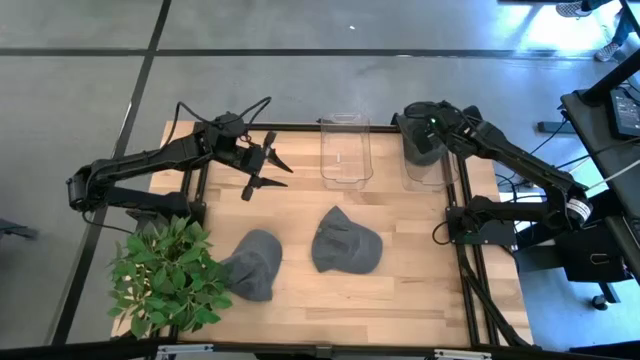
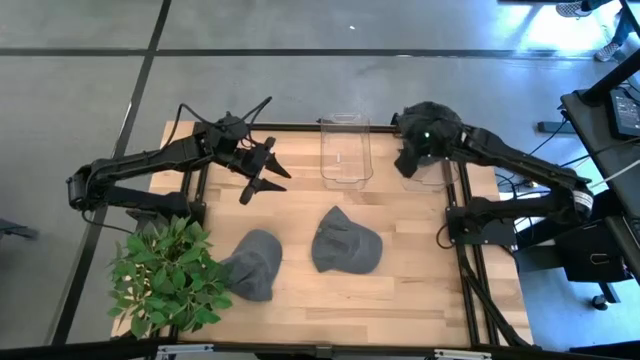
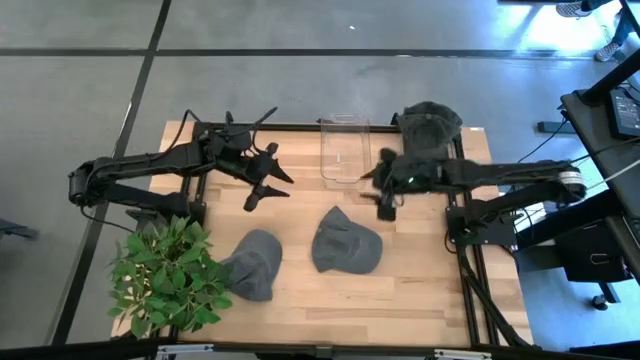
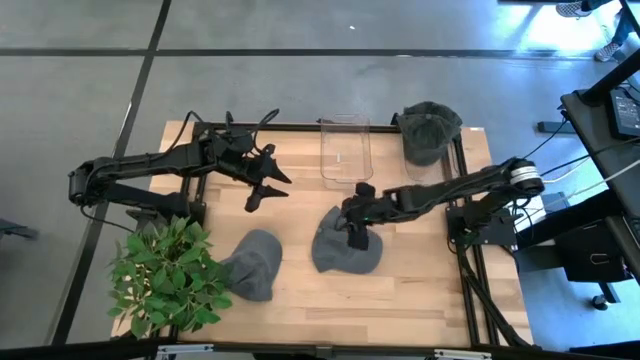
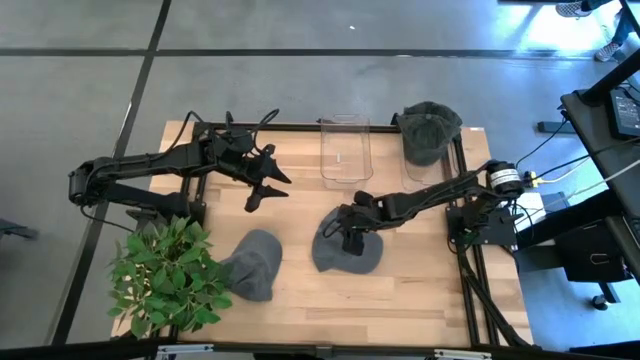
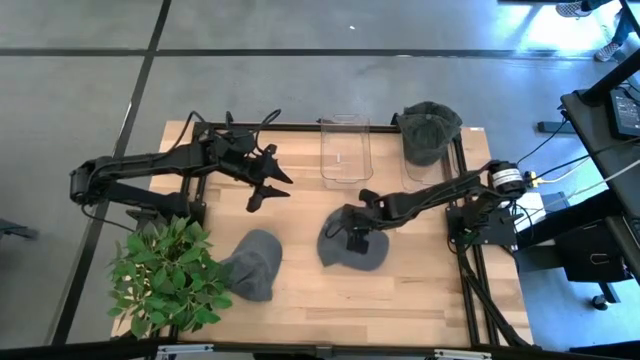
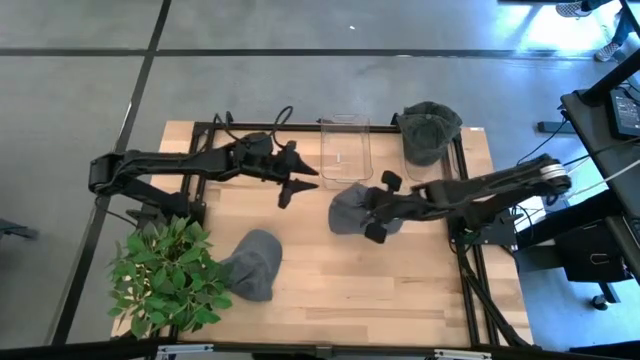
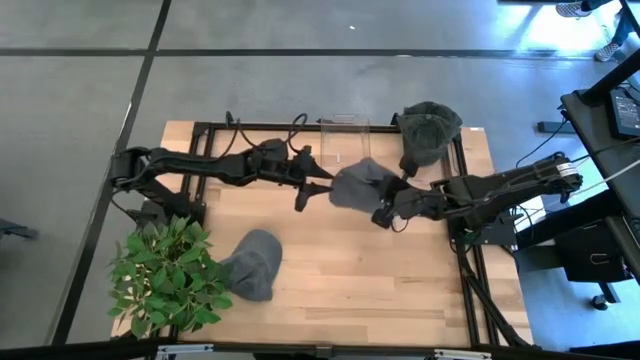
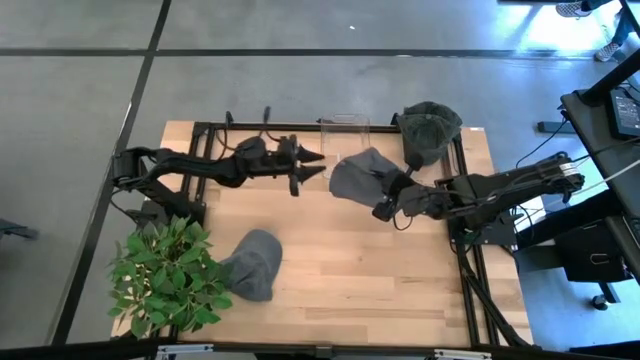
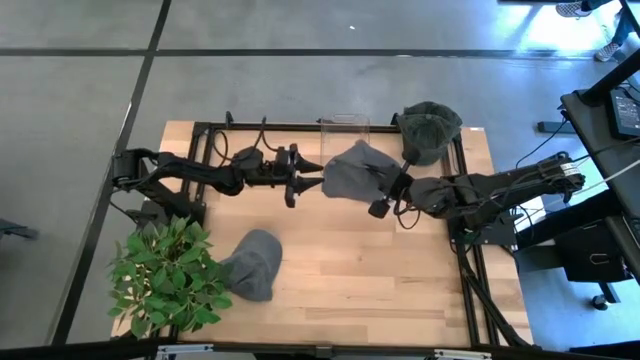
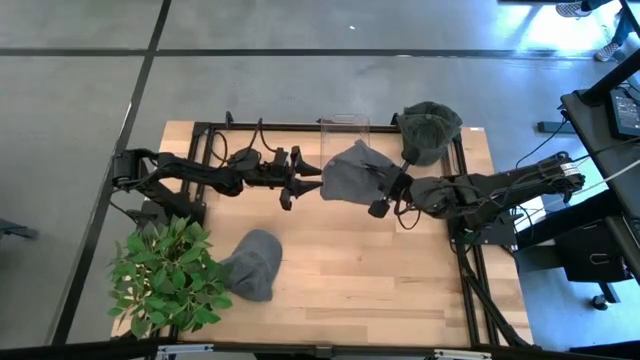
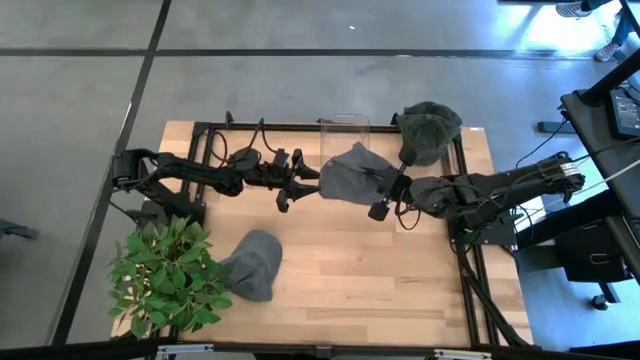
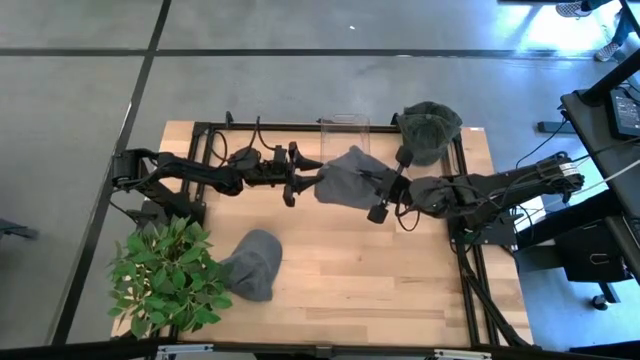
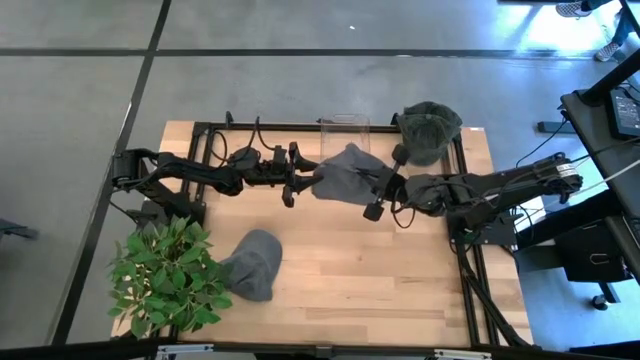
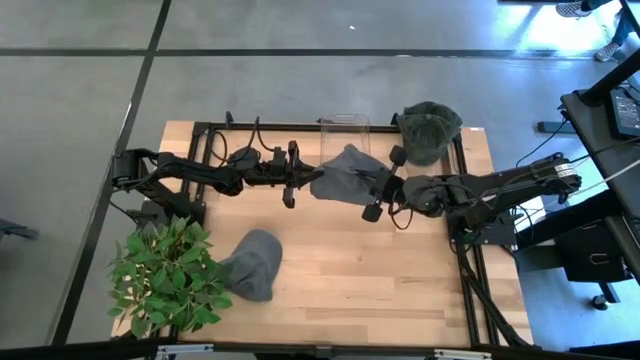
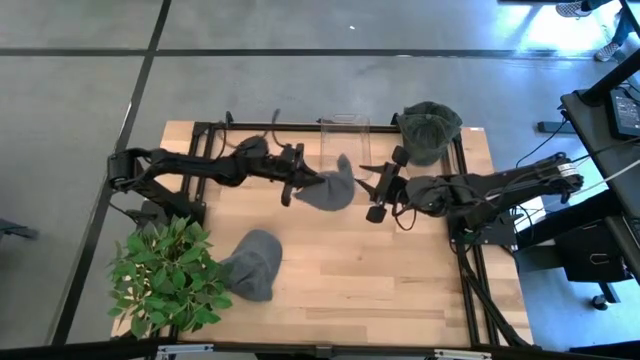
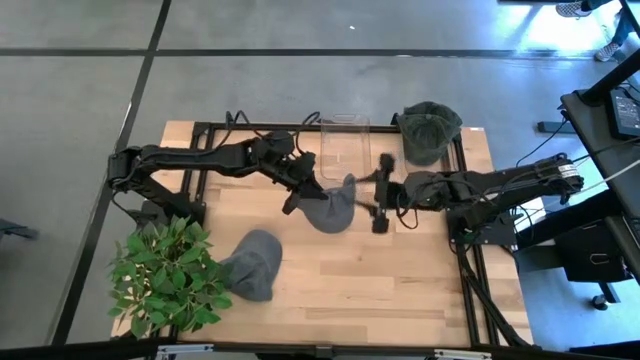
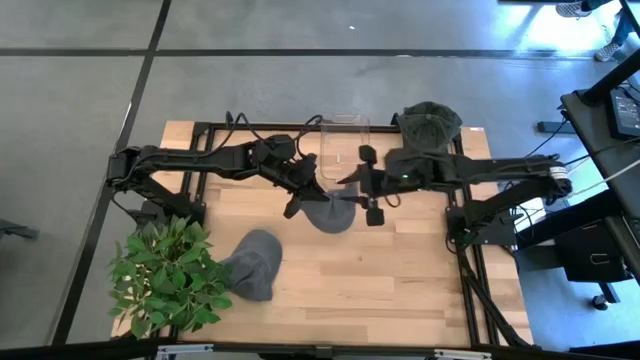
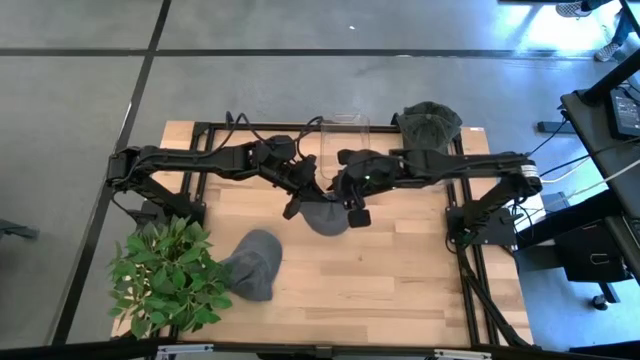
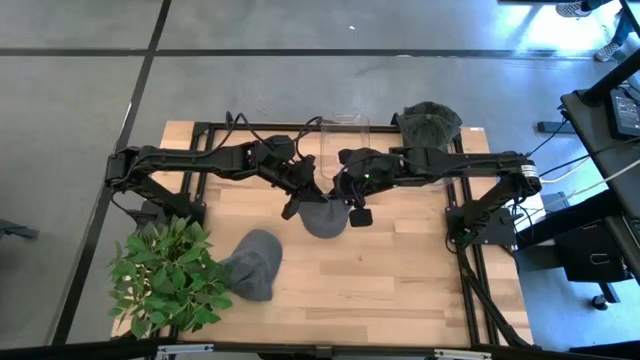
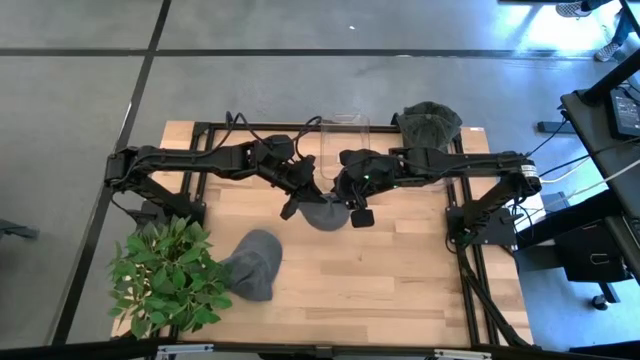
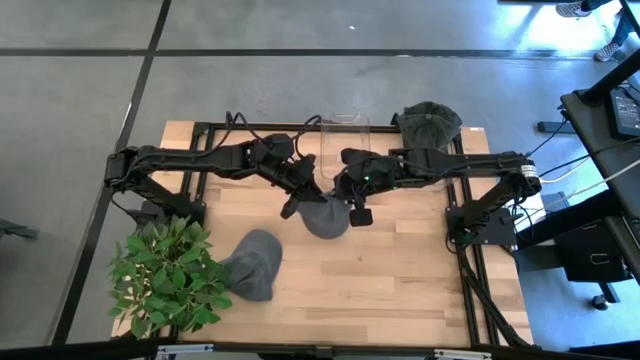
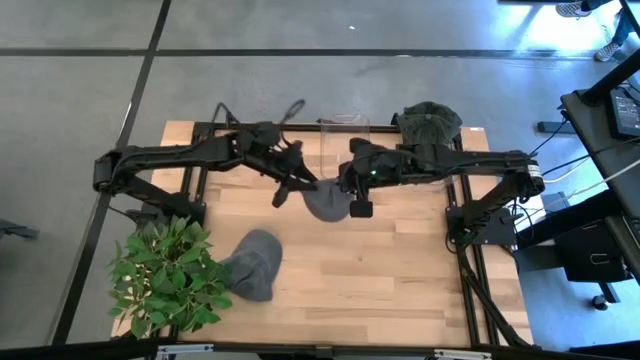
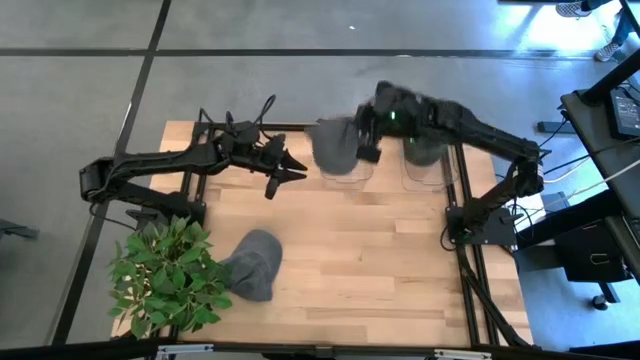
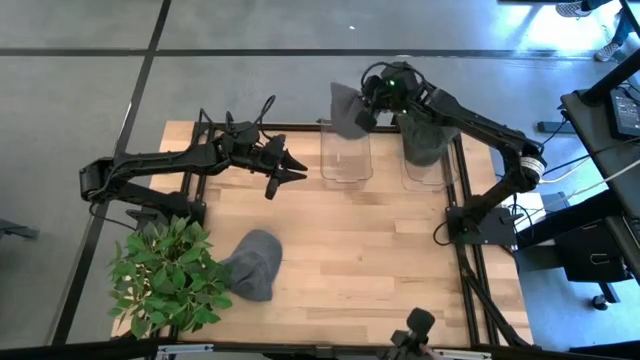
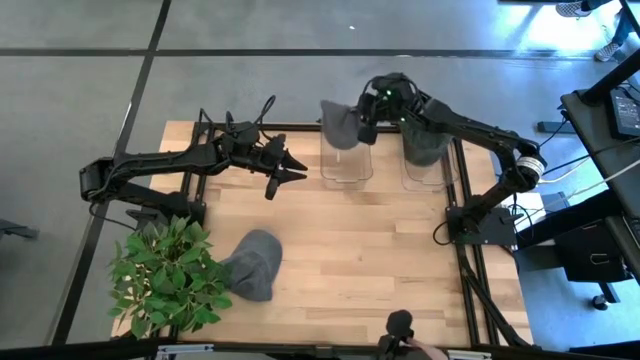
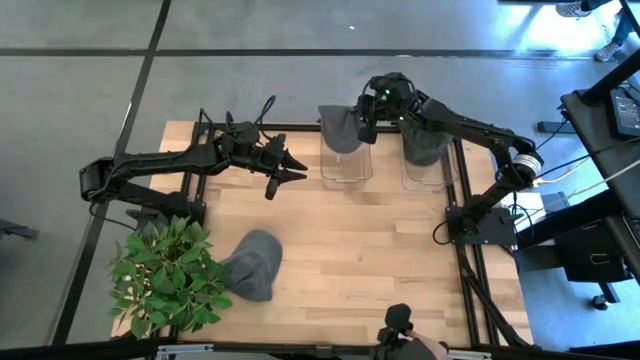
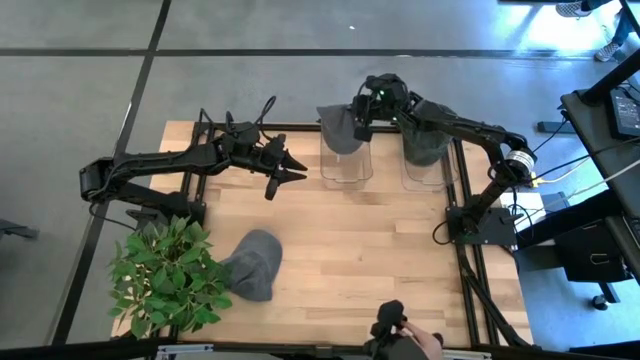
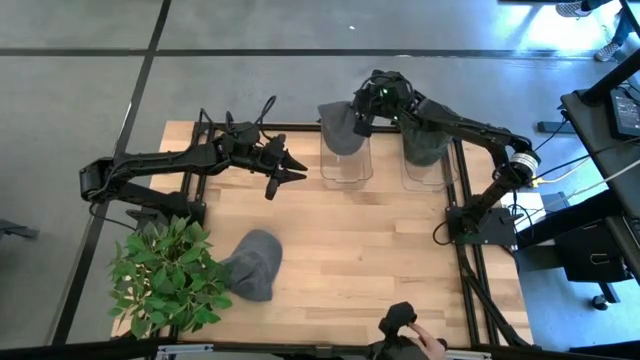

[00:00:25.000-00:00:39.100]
Task: Pick & Place hat
Put the right gray cap into the left transparent bin

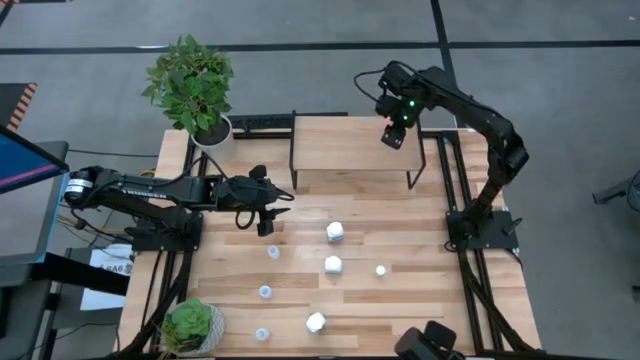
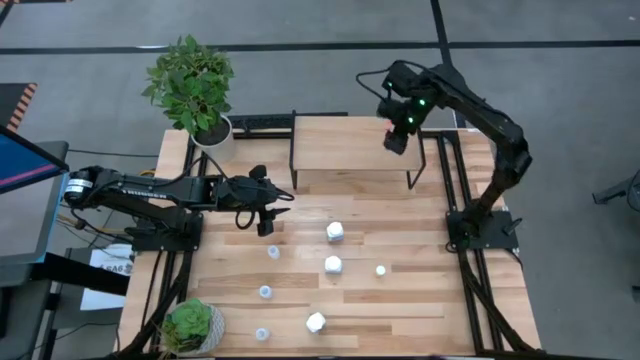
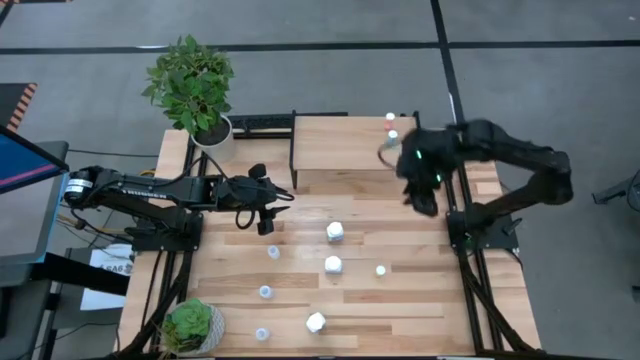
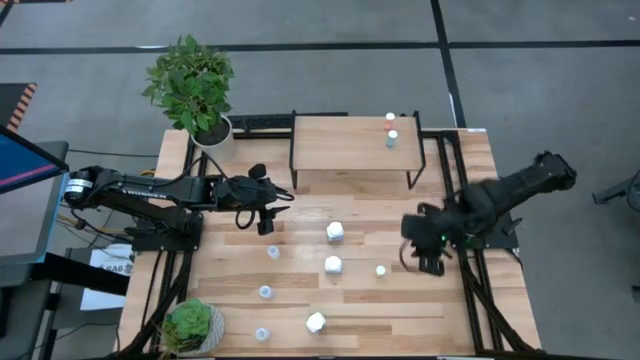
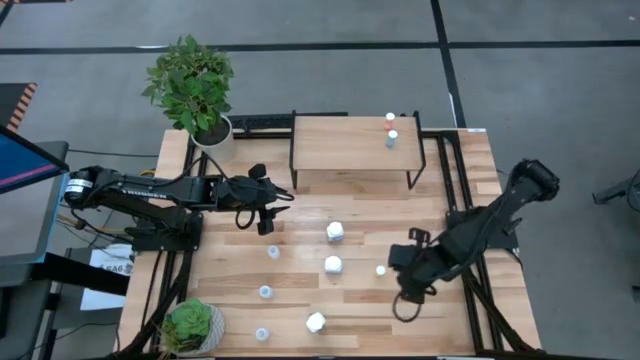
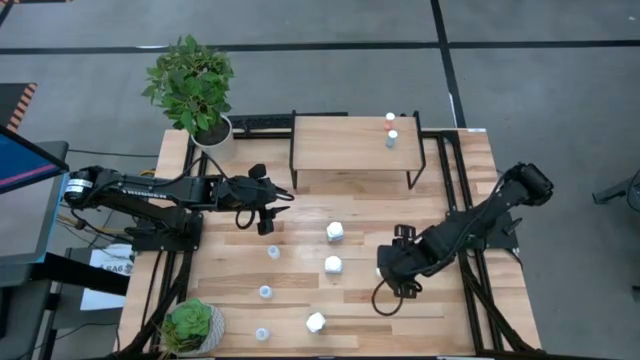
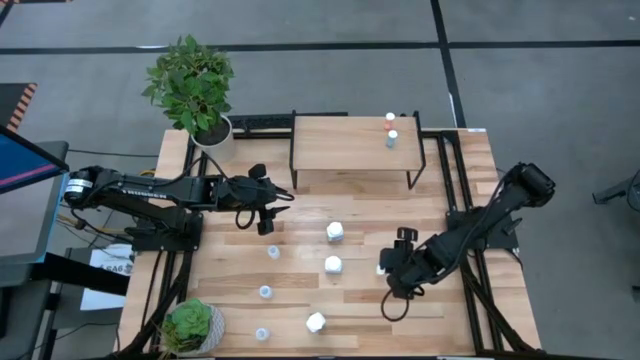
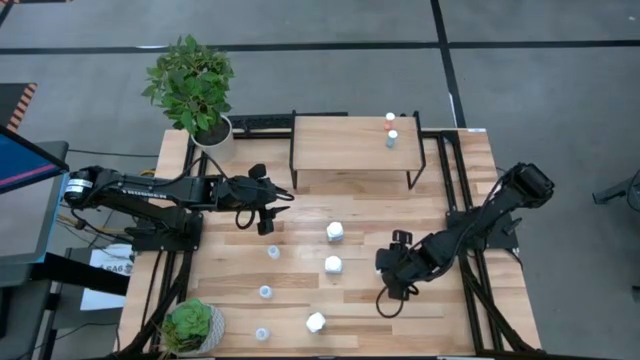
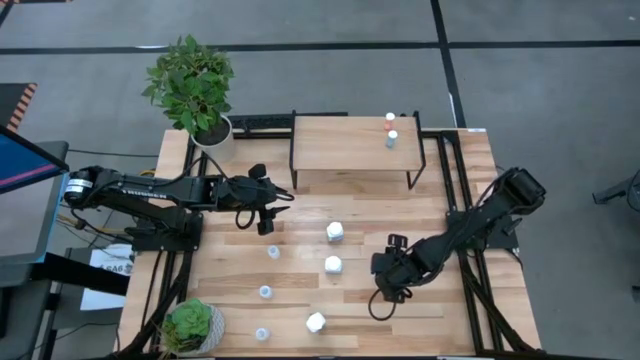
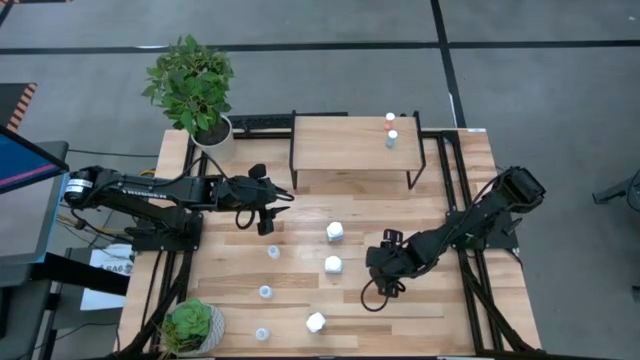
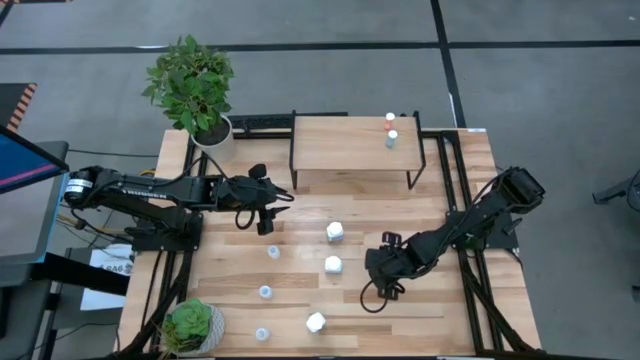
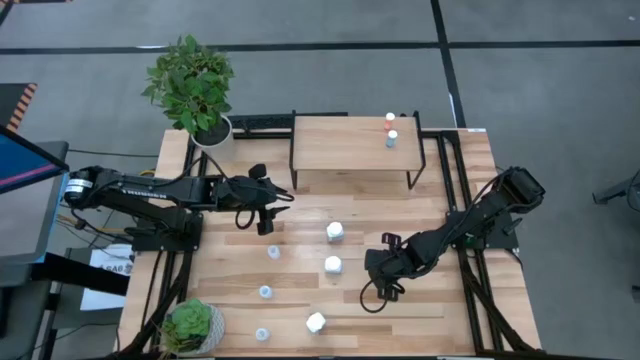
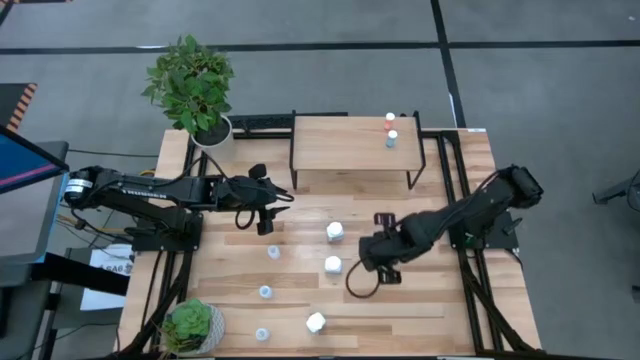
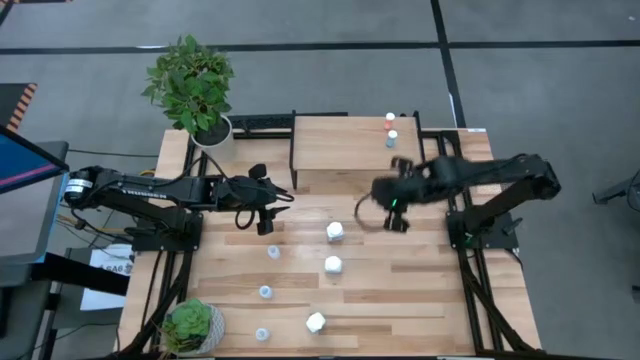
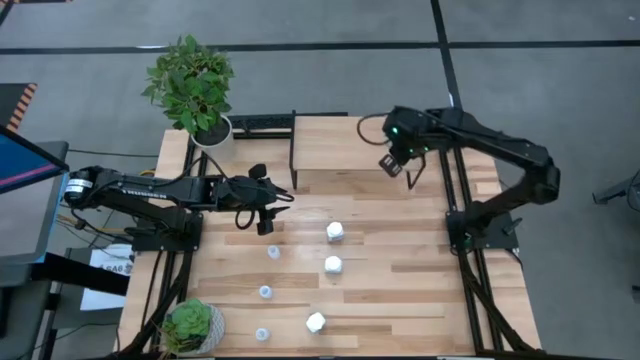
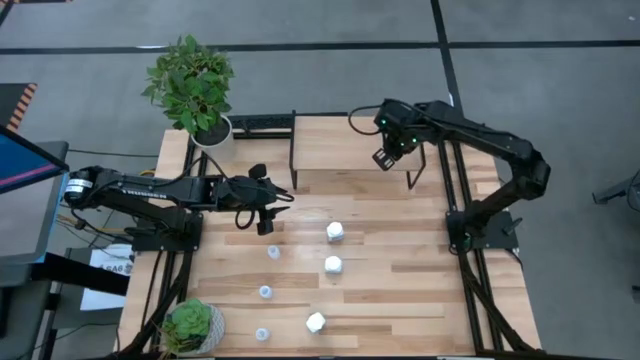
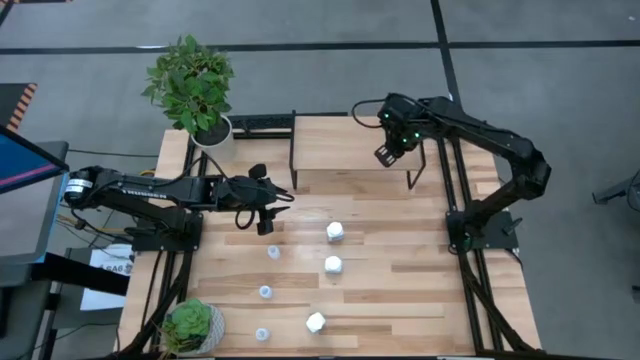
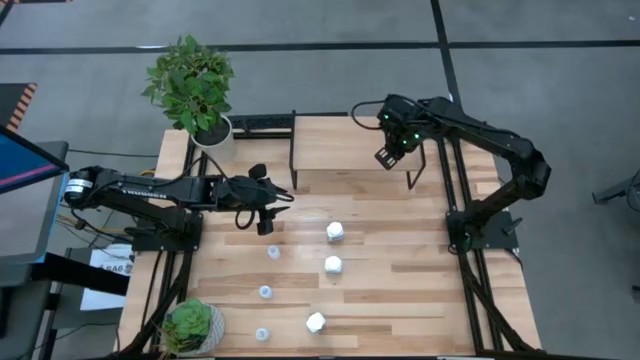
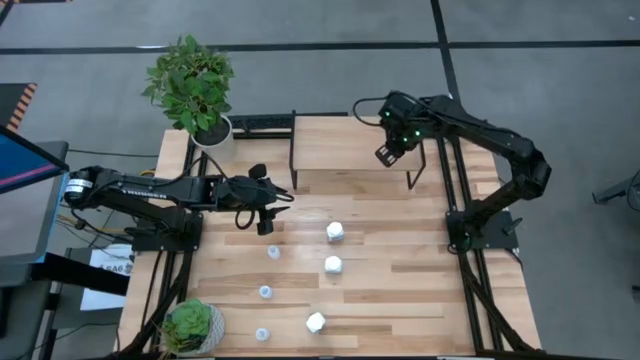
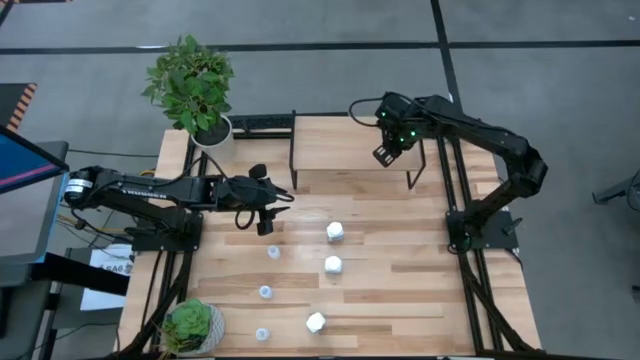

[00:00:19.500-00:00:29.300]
Task: Pick and place medicine bottles onto shelf by color
Put the yellow pill bottle on the shelf
